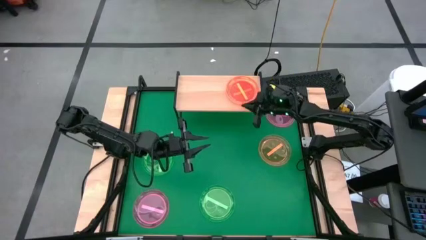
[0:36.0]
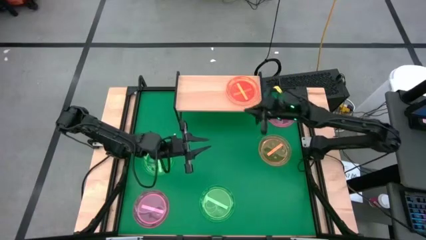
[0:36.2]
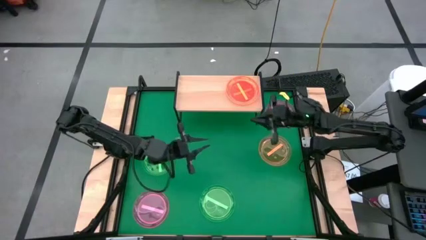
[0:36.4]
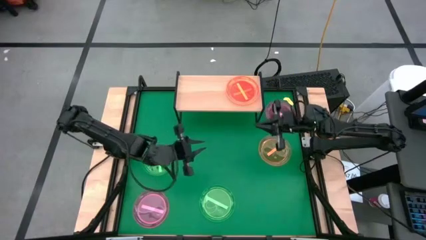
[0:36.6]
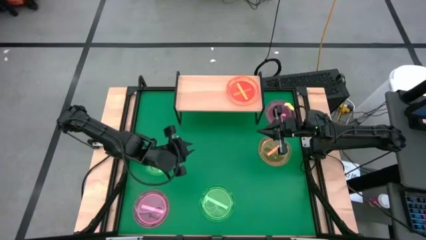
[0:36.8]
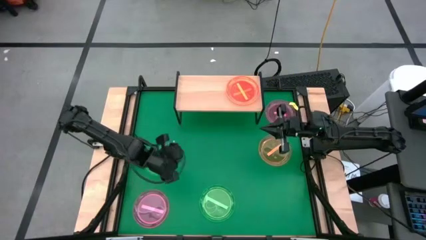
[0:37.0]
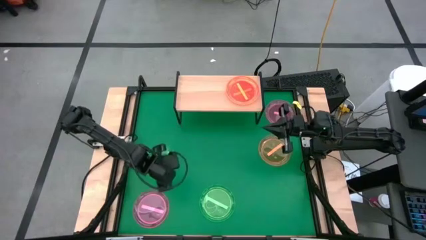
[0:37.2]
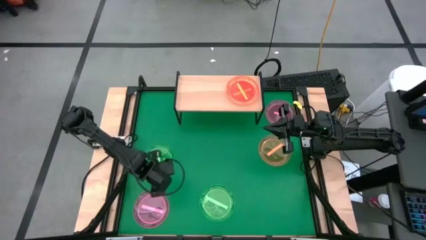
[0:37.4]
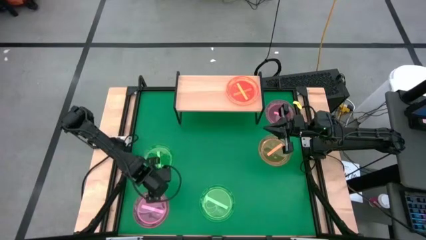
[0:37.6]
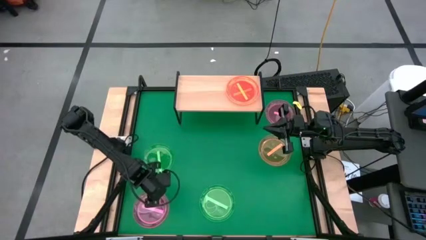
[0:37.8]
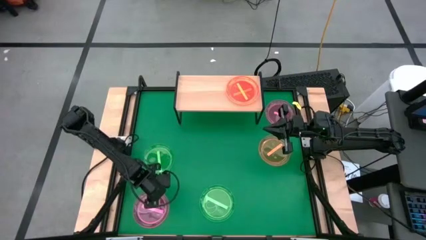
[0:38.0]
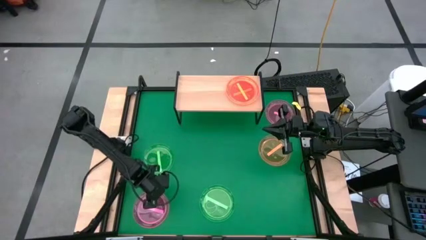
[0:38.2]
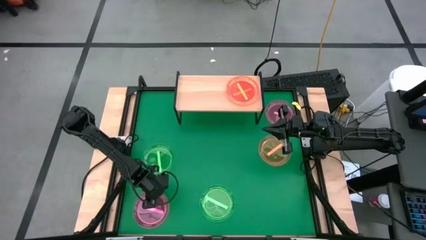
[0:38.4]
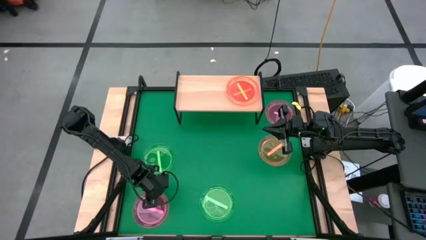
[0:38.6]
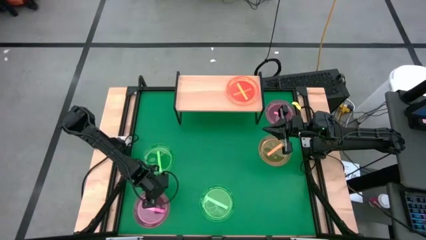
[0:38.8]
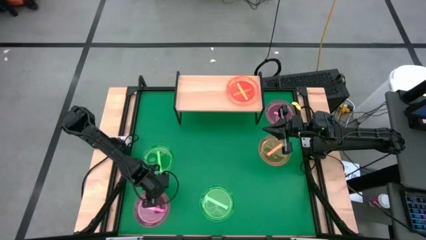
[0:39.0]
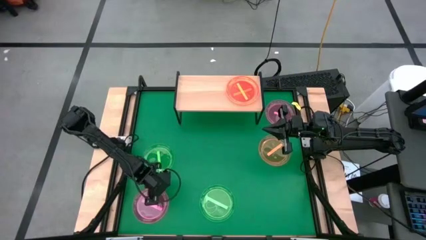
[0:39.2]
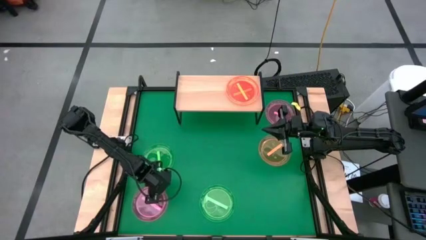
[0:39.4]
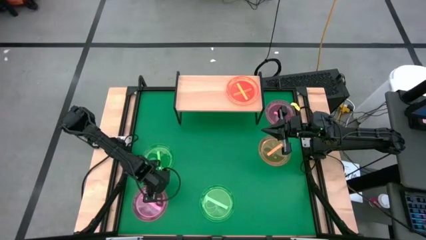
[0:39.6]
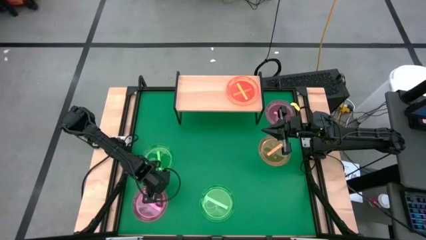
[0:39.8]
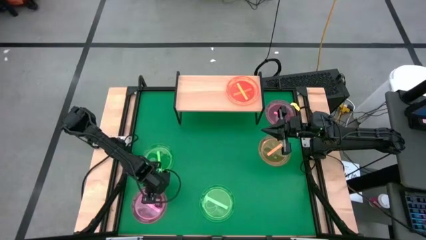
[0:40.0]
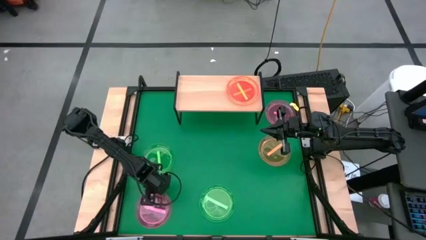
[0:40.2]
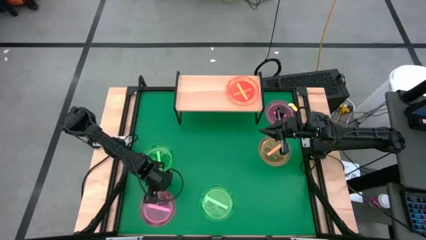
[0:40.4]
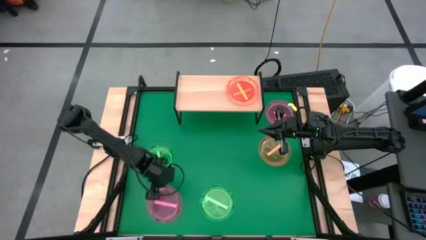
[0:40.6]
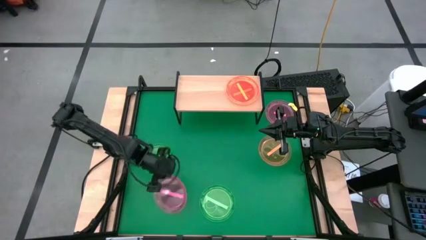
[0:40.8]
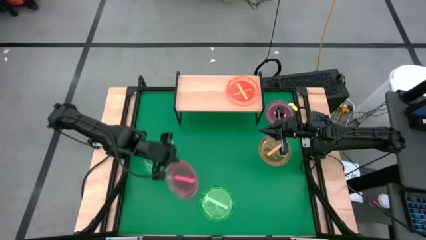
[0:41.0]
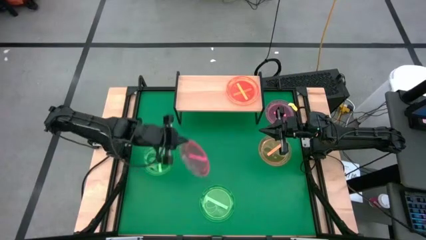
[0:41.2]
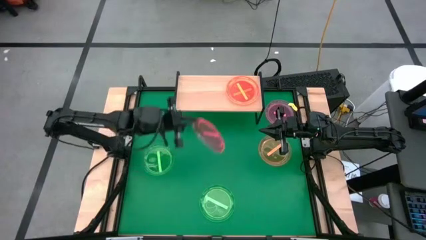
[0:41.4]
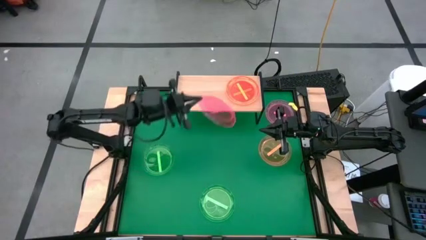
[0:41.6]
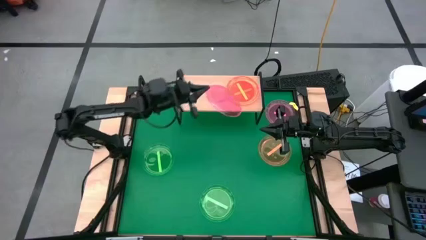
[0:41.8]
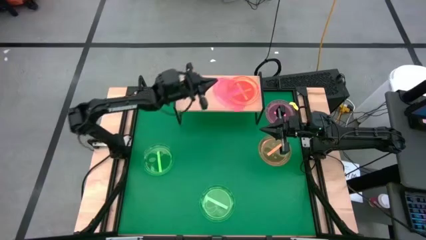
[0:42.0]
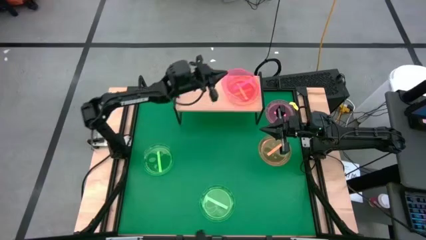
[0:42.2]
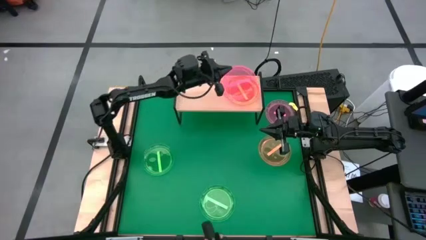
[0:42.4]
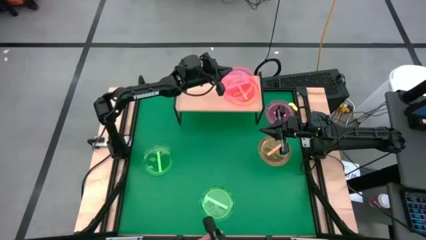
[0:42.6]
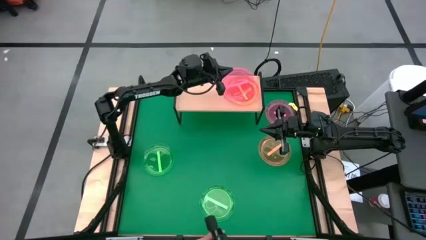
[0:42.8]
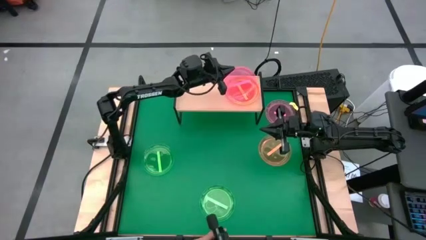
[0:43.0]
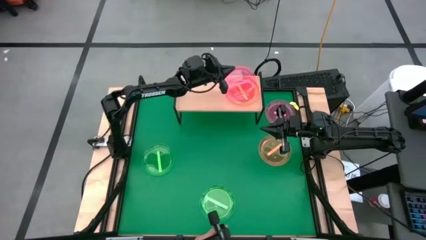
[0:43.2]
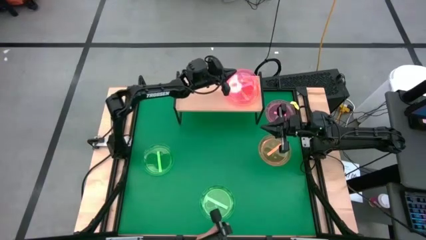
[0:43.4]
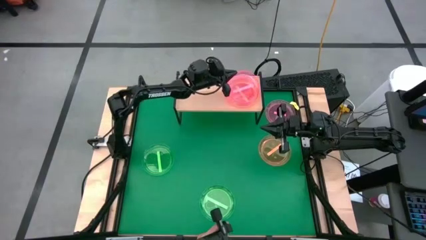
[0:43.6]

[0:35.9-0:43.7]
Task: Place and stack plates onto a shelf
Stack the pink plate on top of the orange plate on the shelf

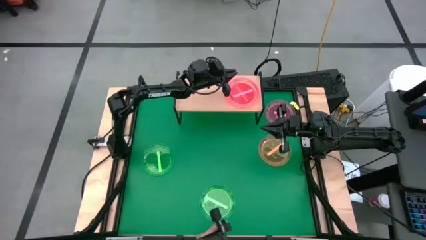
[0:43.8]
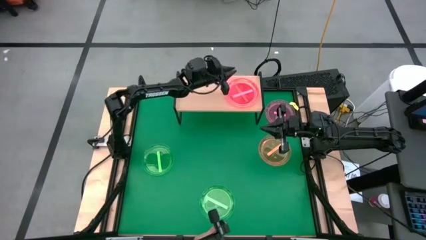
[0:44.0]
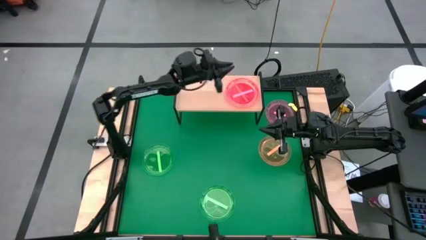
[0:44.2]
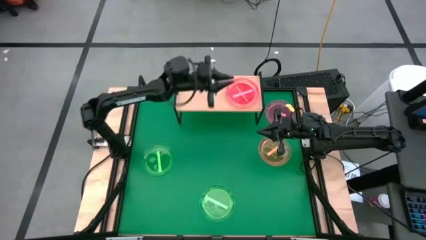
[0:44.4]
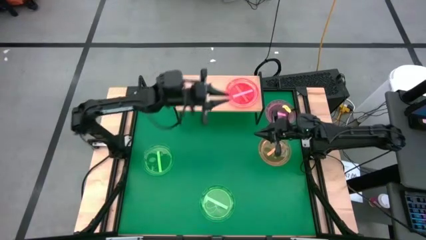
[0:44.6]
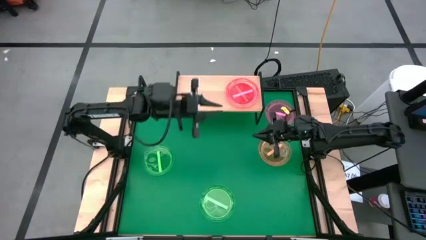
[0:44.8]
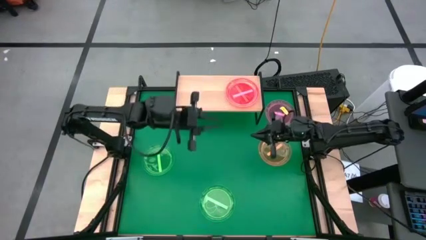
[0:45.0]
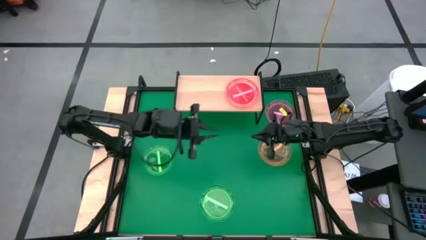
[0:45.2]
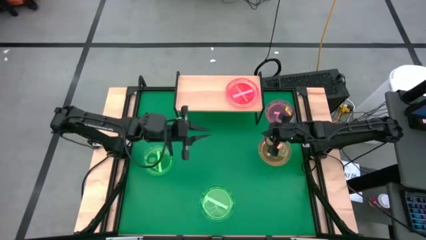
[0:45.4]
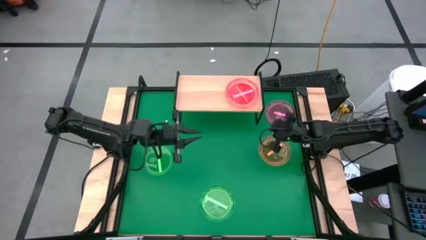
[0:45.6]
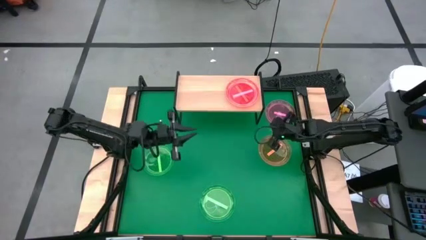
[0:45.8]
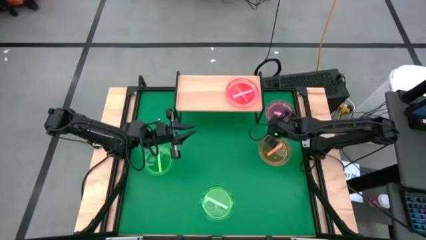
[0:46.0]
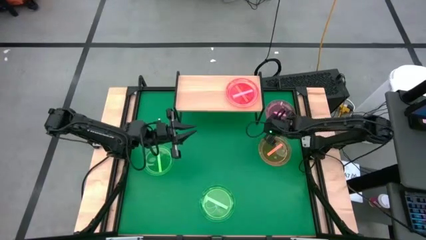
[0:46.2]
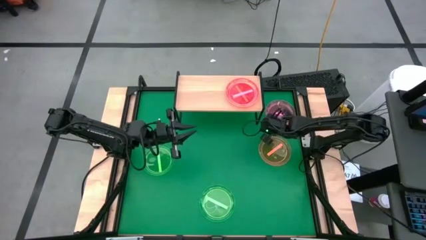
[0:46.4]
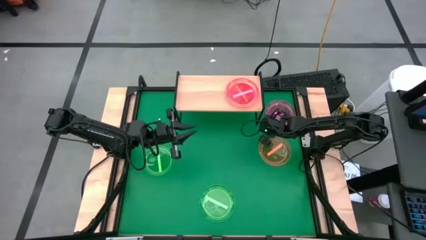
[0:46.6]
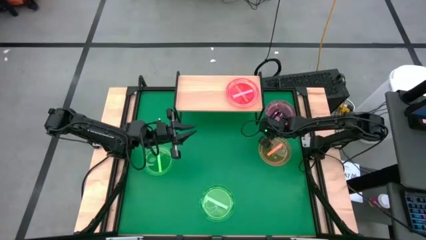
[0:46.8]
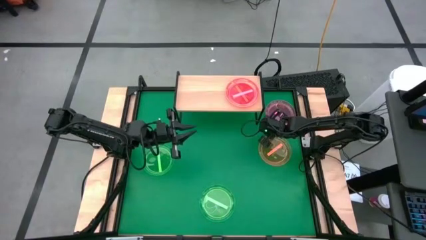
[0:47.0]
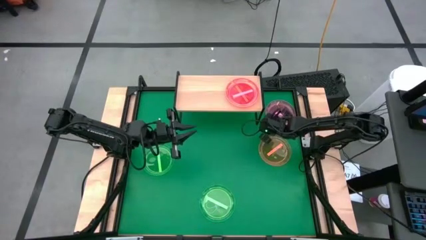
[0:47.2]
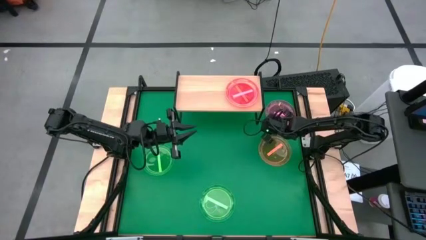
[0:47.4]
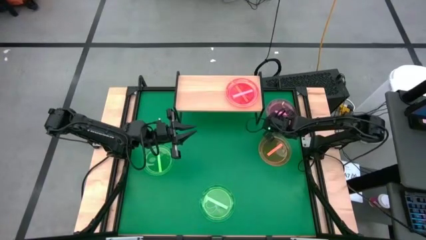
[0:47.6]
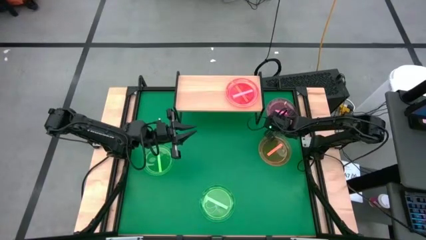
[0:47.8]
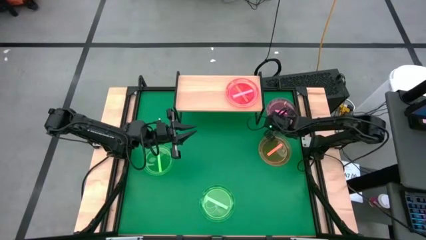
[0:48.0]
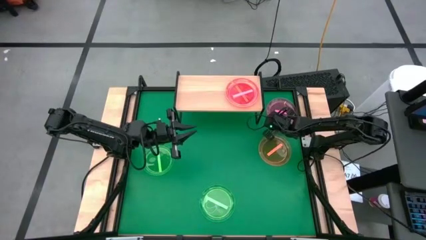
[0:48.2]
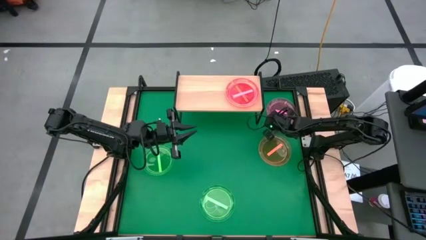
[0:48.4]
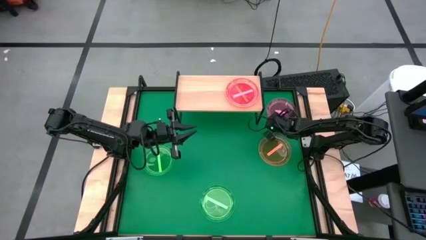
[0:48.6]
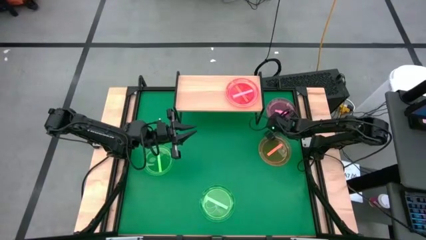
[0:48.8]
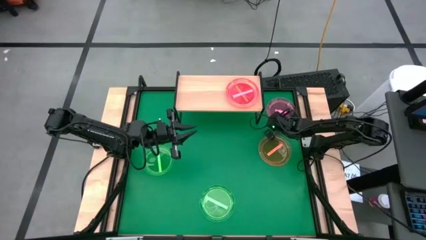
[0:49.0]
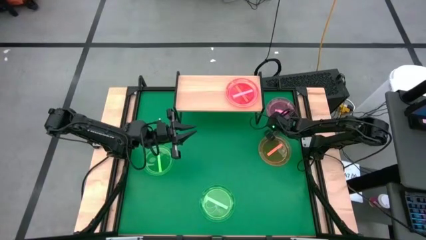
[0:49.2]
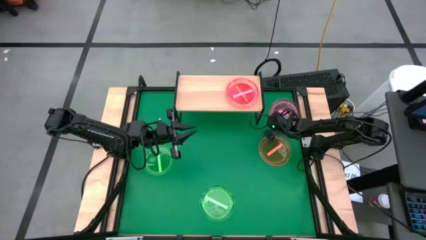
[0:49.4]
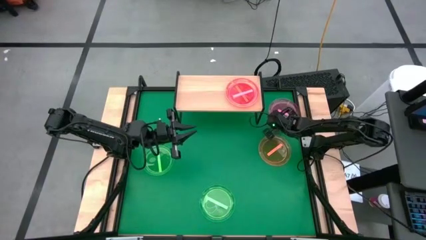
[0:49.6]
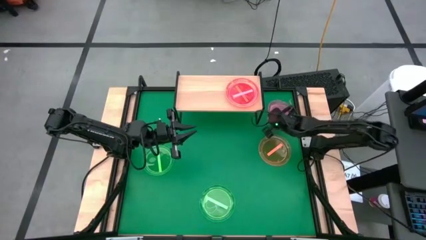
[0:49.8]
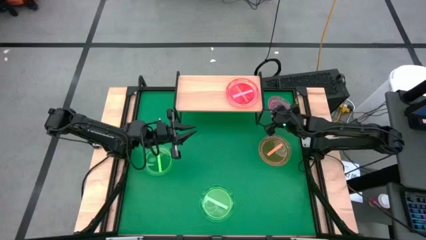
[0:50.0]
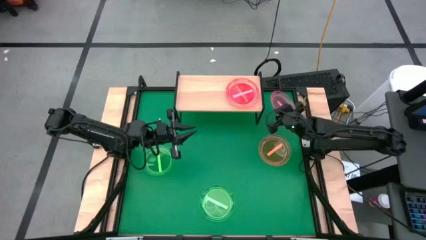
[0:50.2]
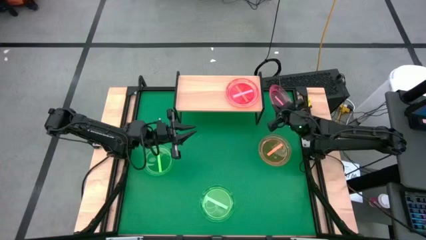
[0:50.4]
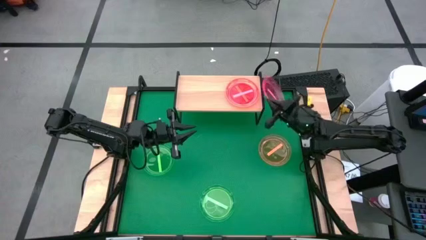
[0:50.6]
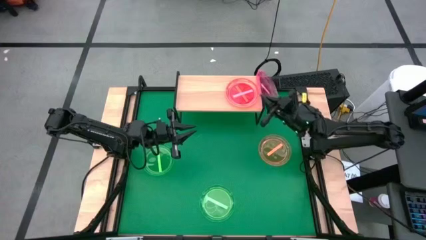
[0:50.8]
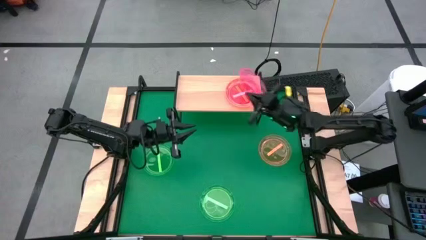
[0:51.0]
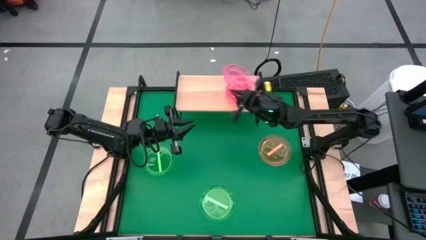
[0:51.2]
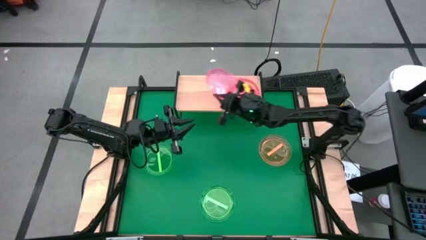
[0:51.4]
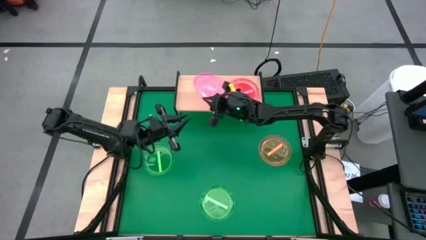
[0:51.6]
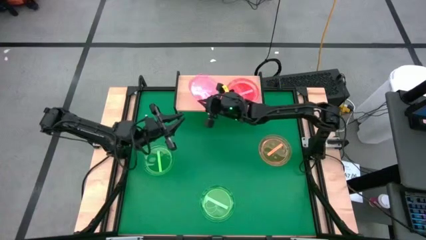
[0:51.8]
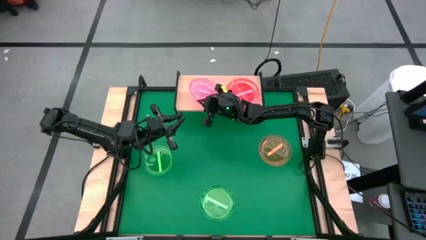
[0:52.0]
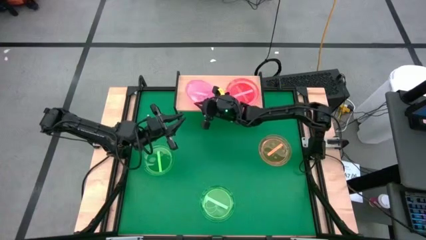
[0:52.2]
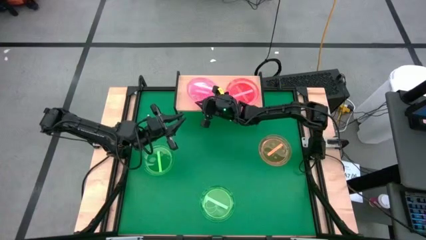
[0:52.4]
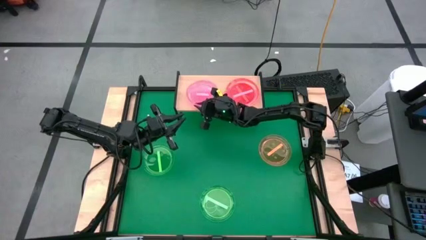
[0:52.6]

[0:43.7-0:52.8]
Put the pink plate on the shelf
